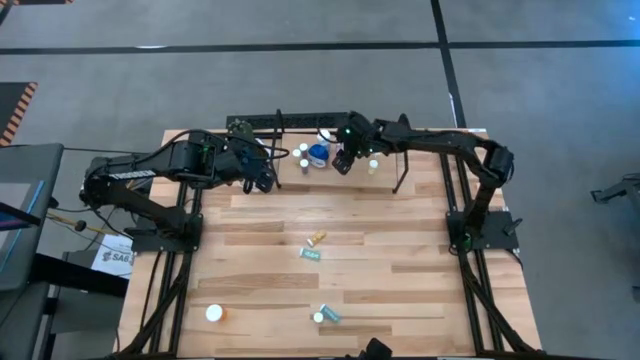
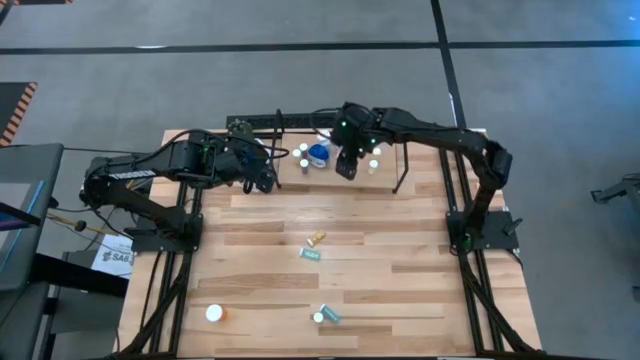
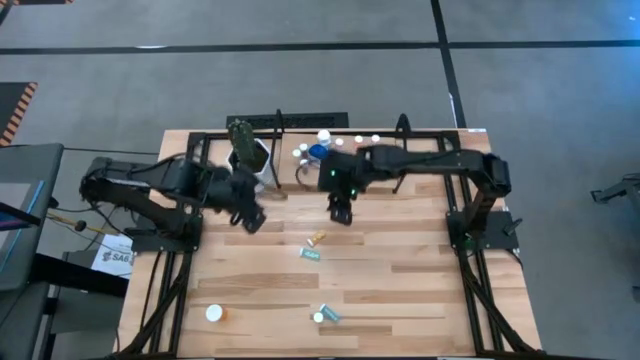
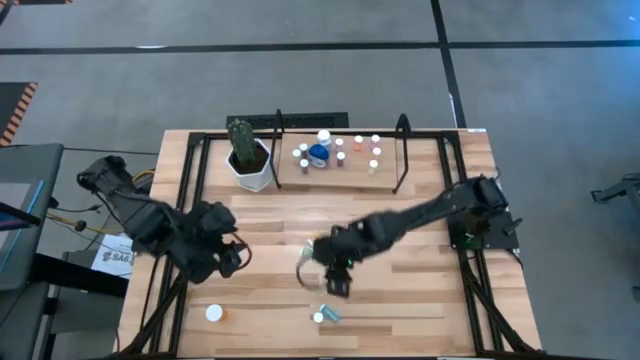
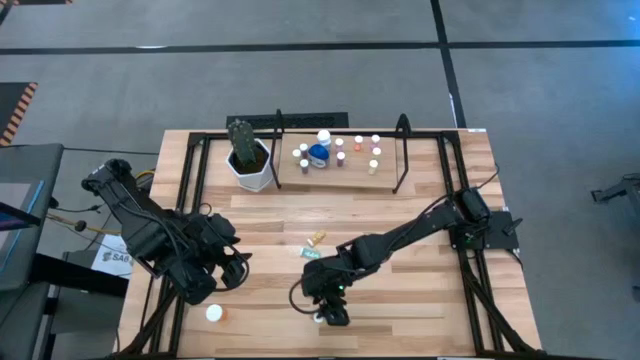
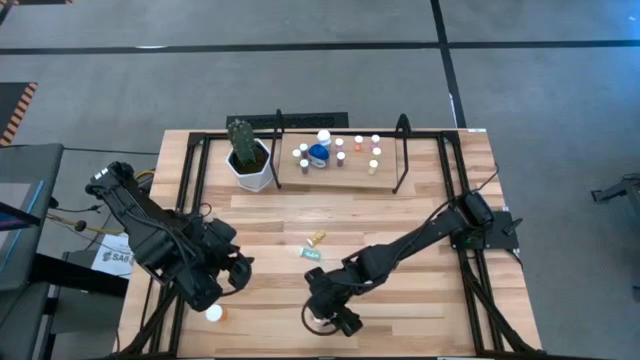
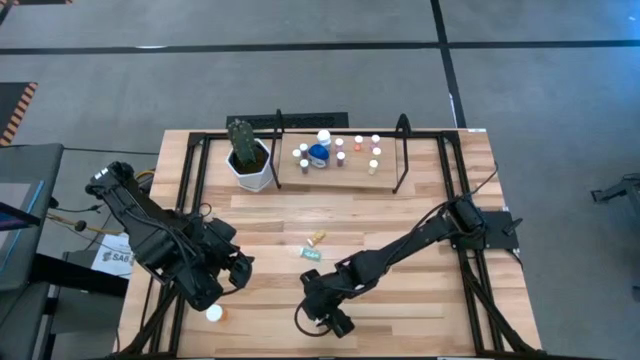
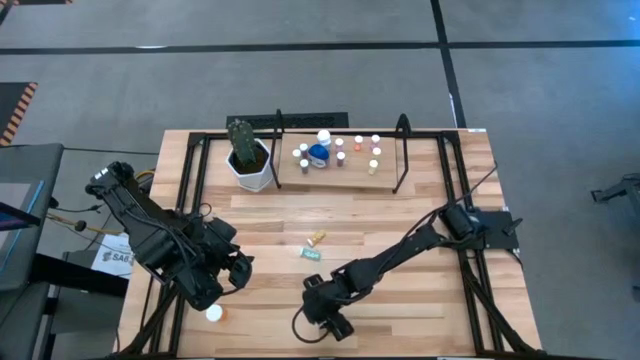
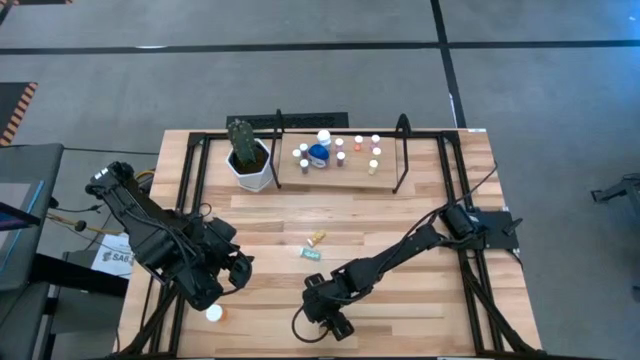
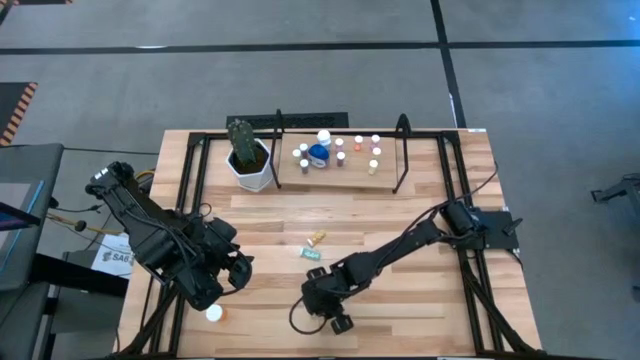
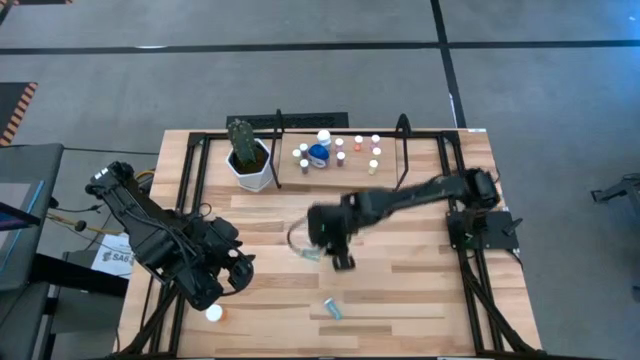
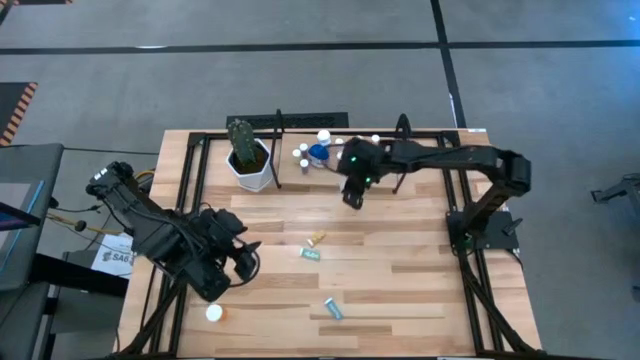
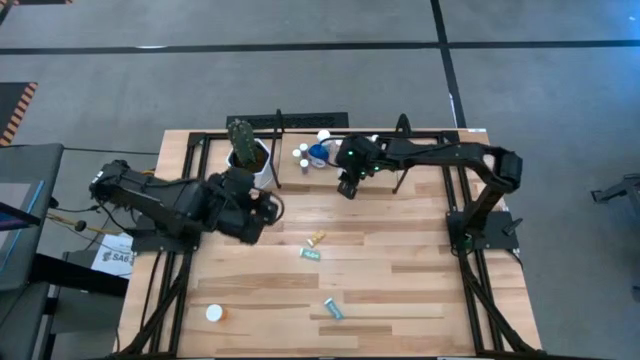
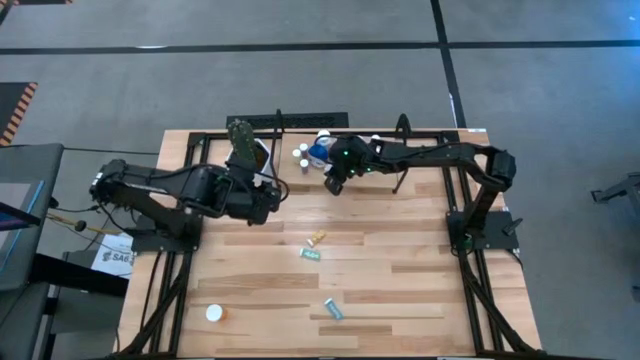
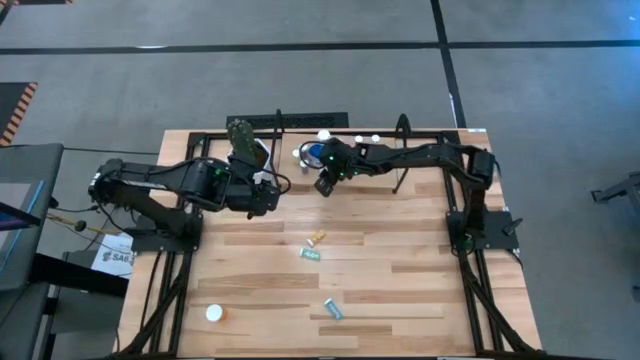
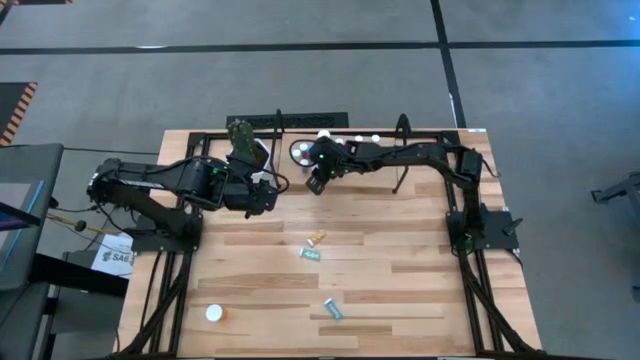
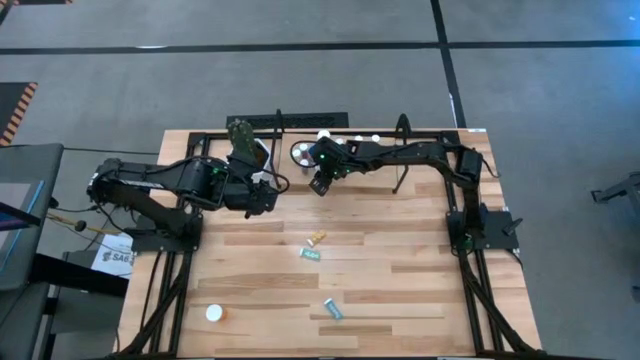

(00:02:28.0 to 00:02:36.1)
Task: Pick and place medicine bottles onto shelf by color
Put the yellow pill bottle on the shelf

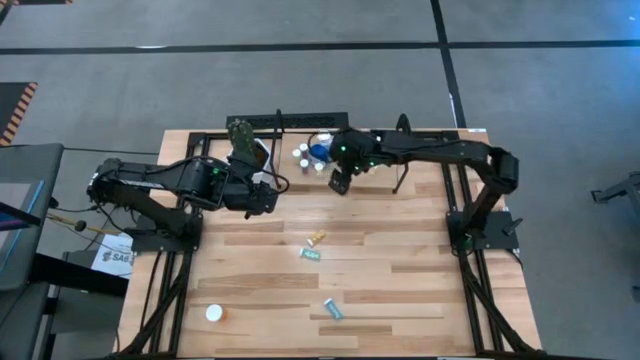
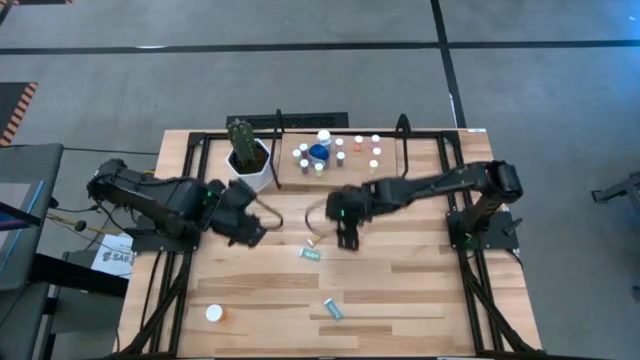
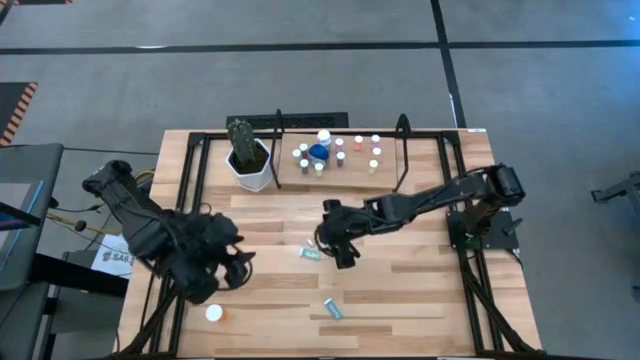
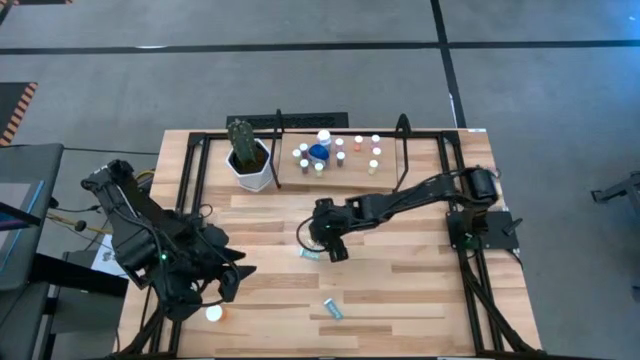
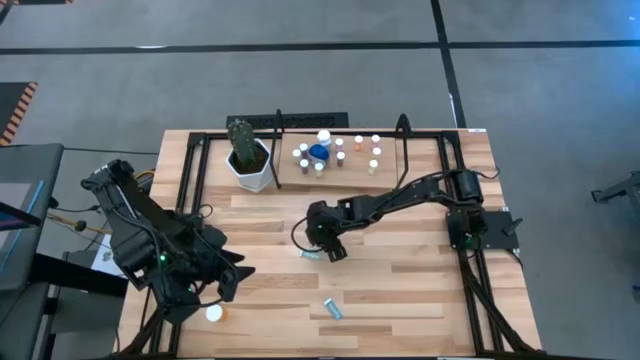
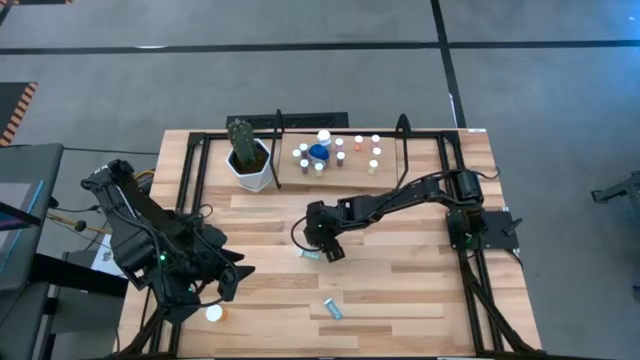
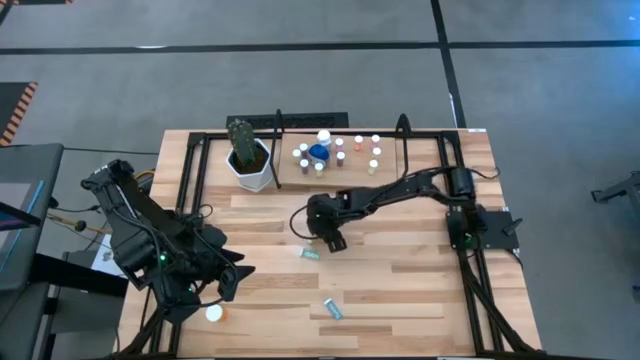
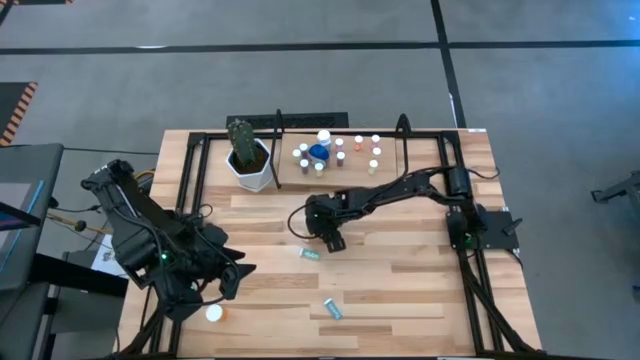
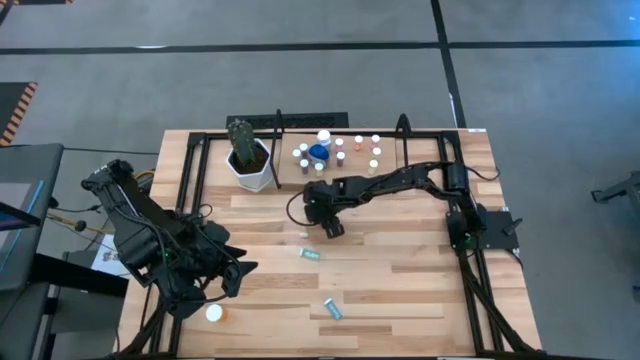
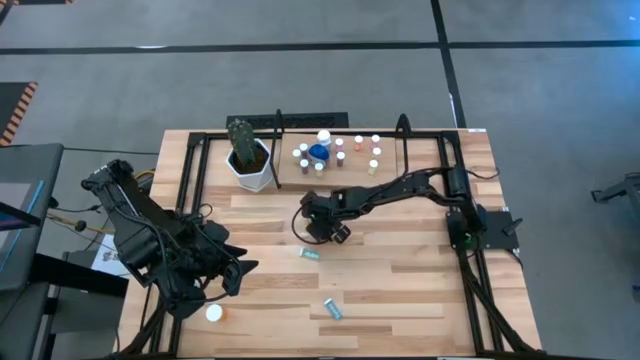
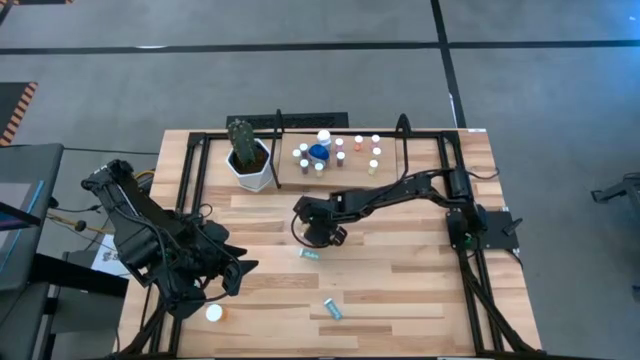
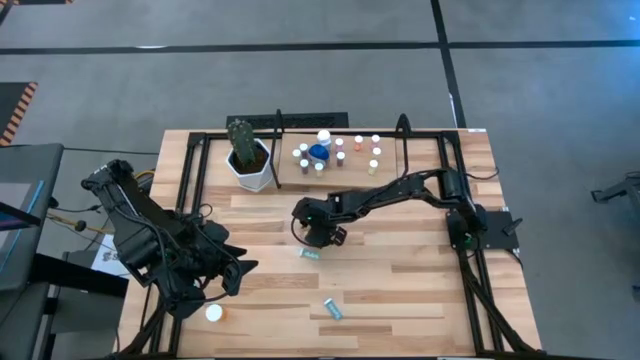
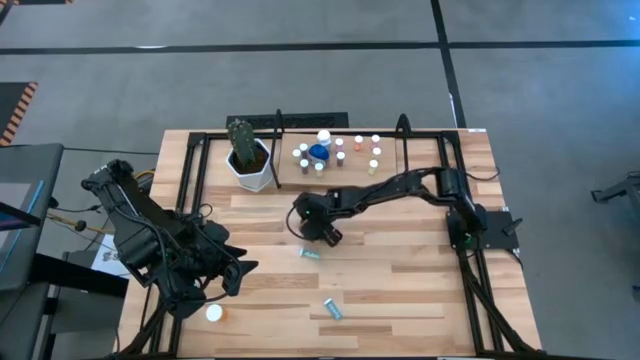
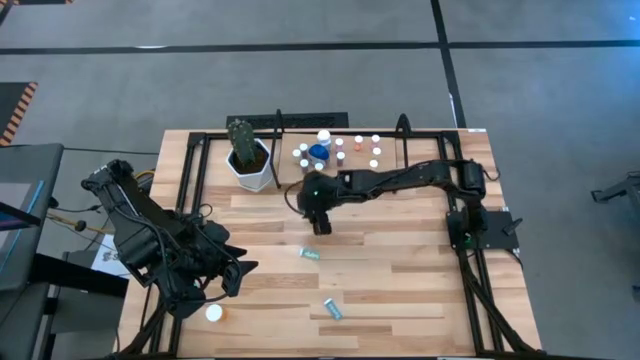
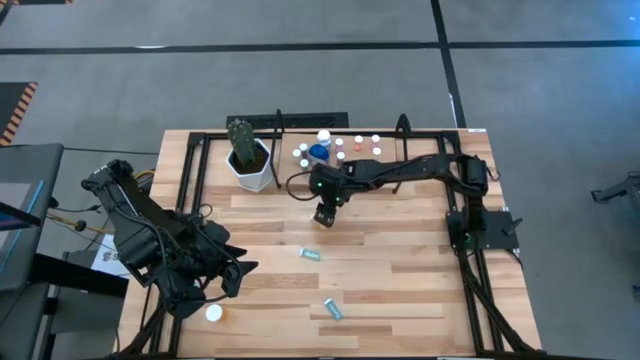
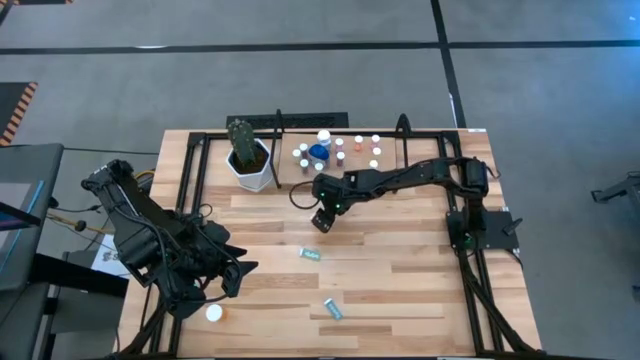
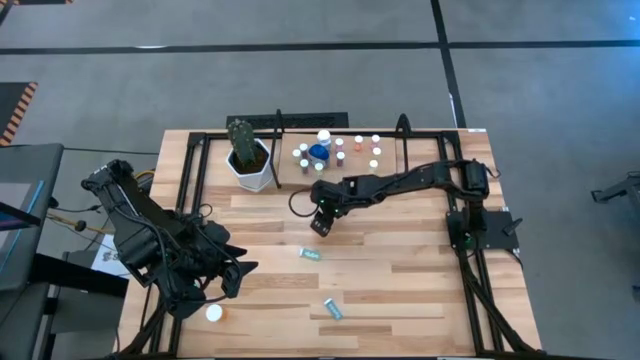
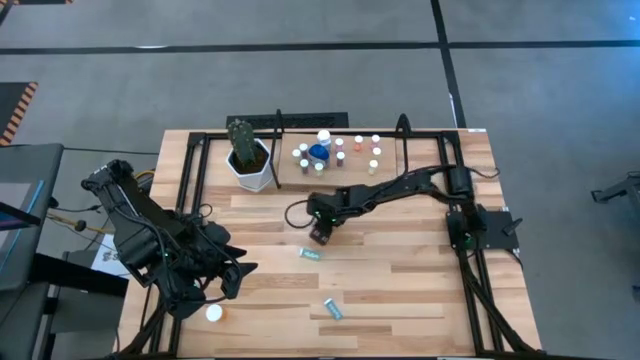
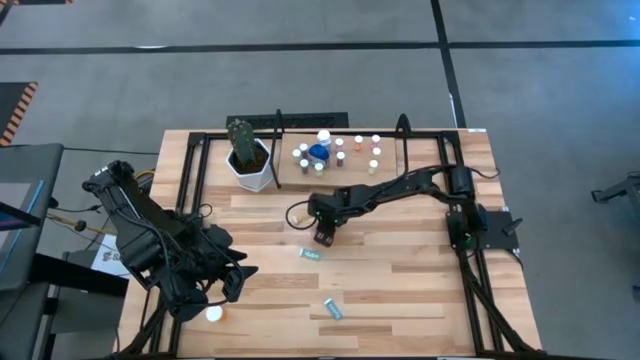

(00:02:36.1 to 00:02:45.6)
Put the yellow pill bottle on the shelf

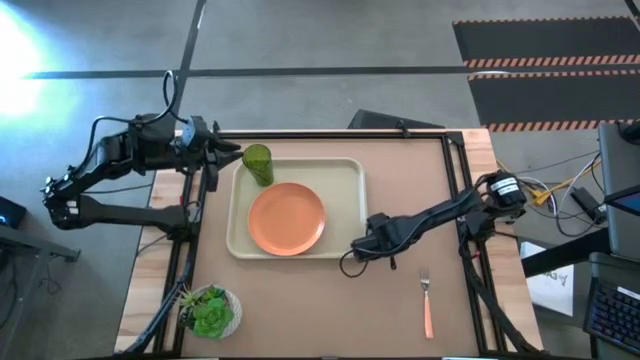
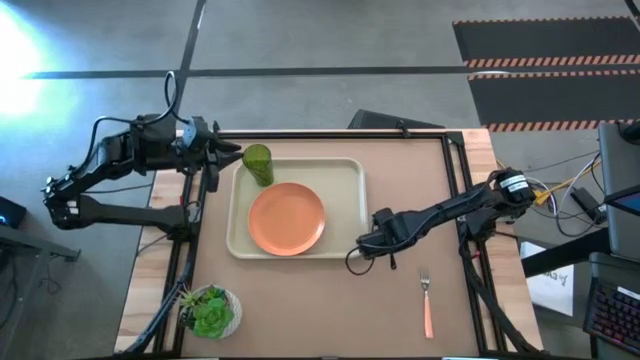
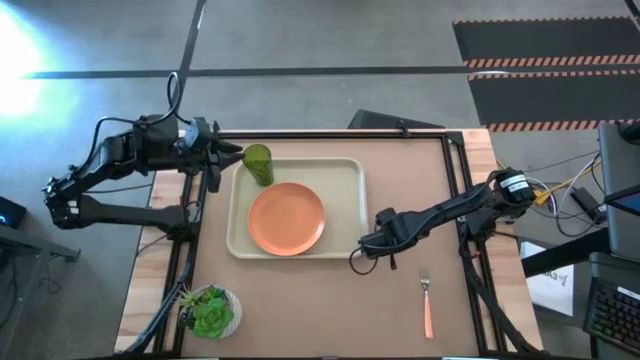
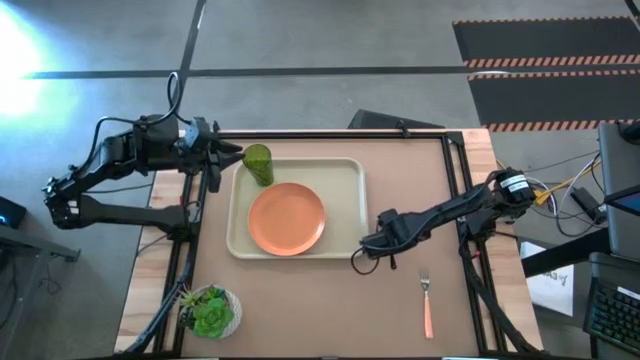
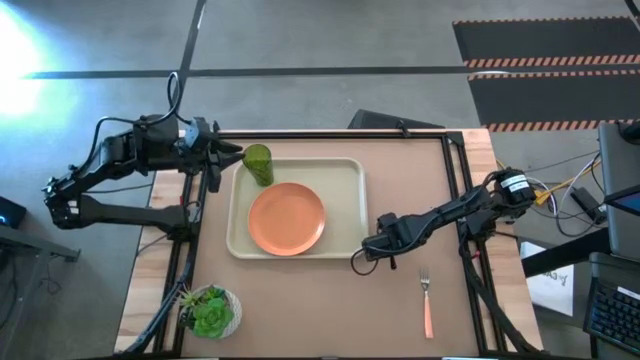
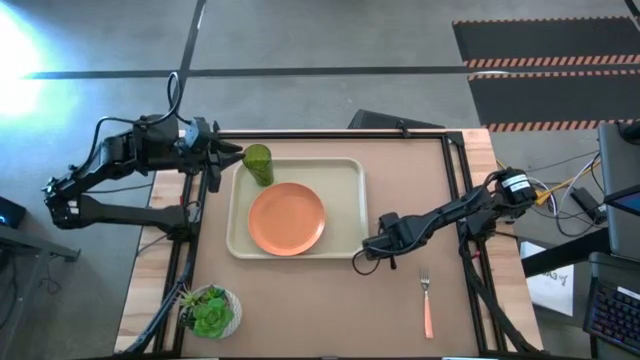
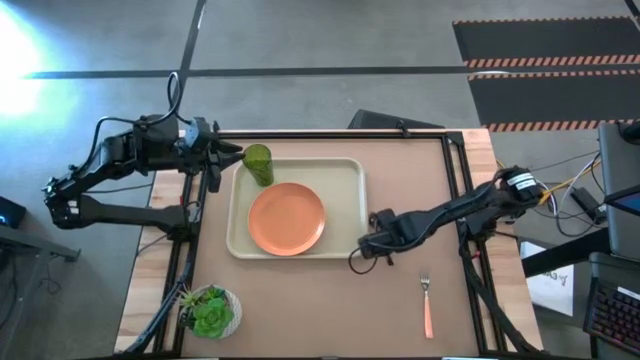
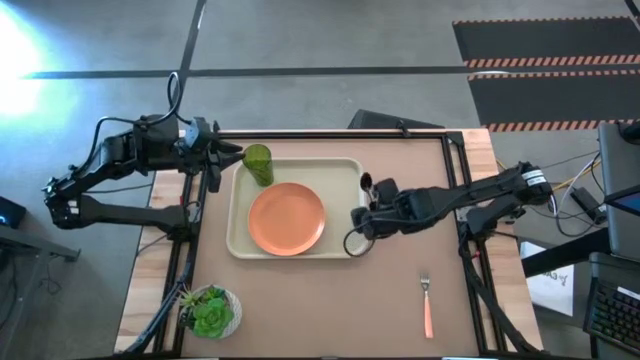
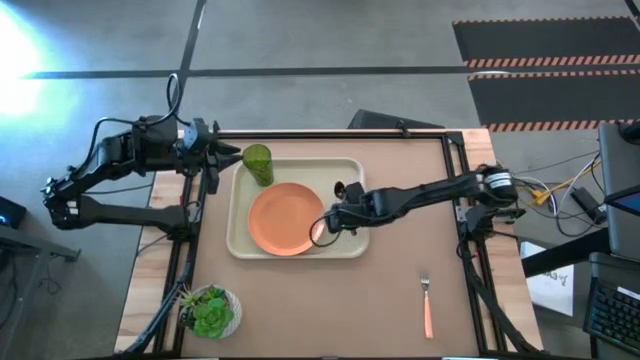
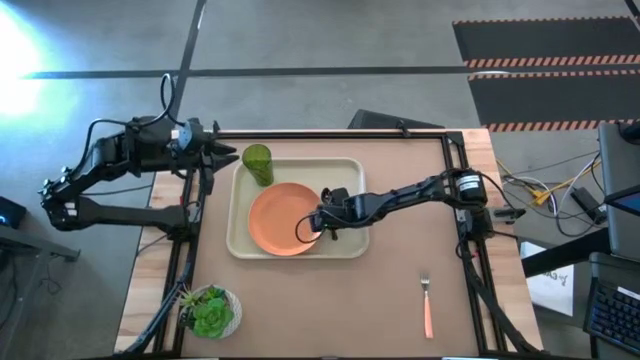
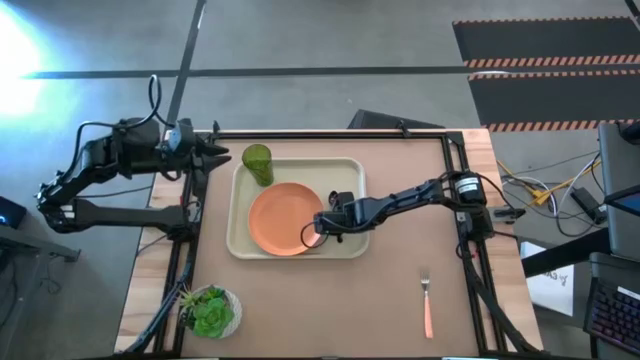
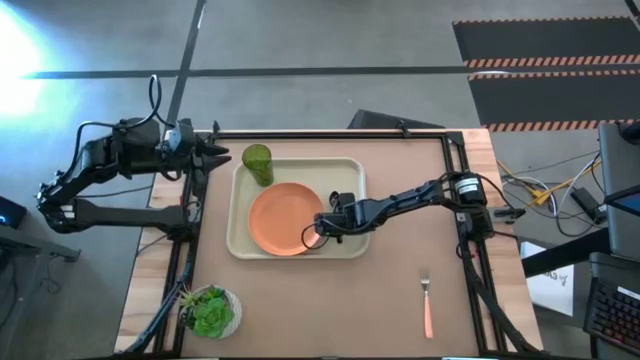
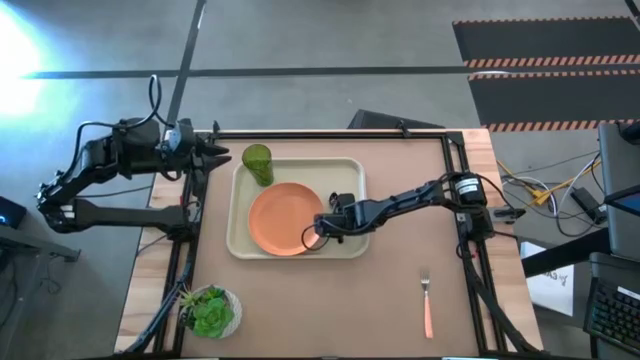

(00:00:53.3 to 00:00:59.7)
Task: Pick and place plate/cup/fork/spoon on tray
Put the black spoon on the white serving tray to the right of the orange plate
